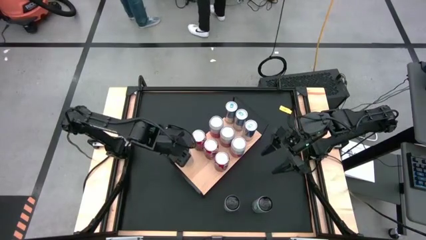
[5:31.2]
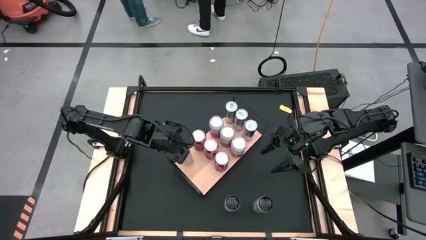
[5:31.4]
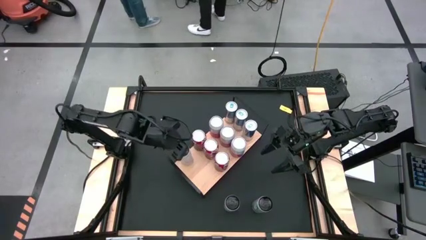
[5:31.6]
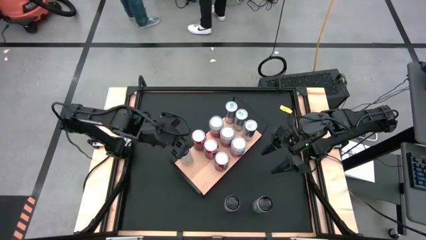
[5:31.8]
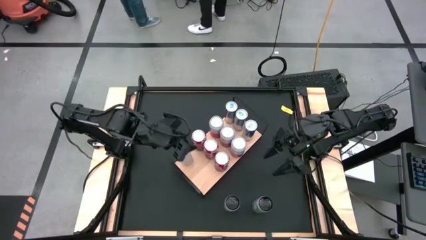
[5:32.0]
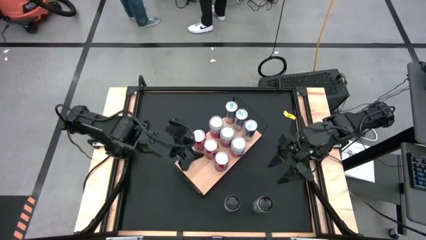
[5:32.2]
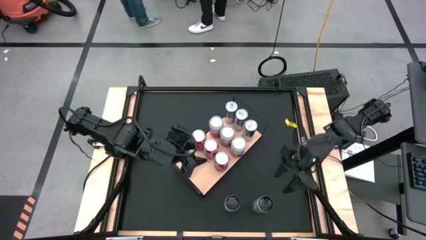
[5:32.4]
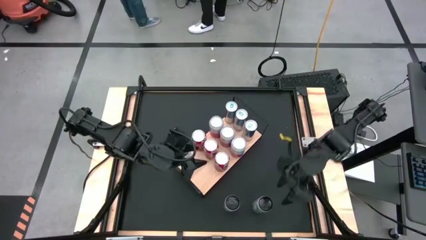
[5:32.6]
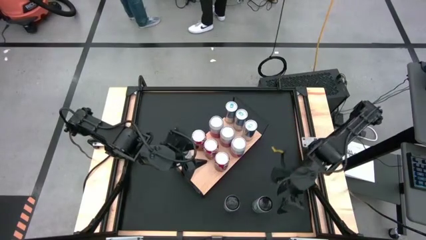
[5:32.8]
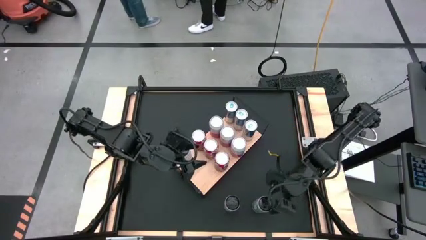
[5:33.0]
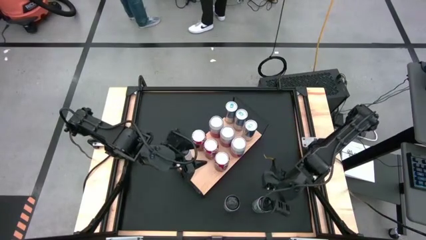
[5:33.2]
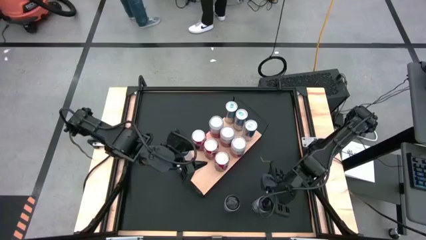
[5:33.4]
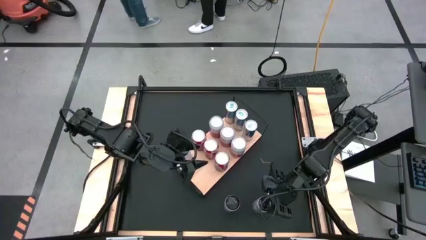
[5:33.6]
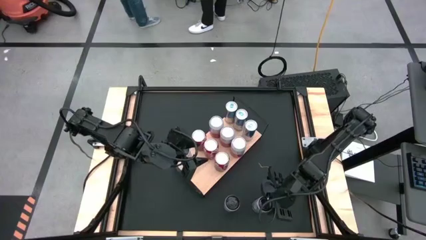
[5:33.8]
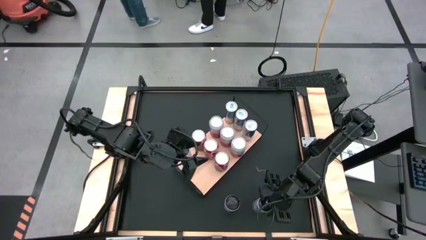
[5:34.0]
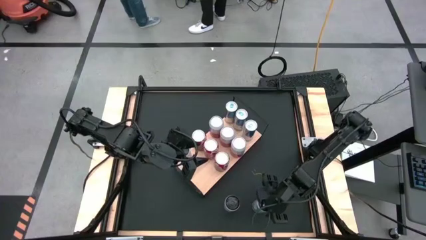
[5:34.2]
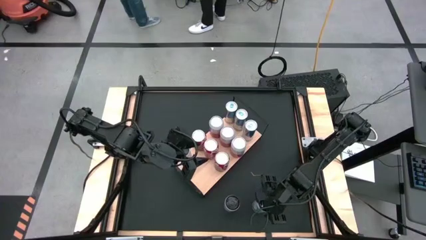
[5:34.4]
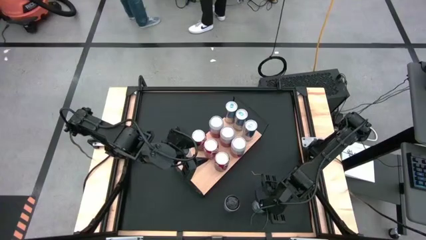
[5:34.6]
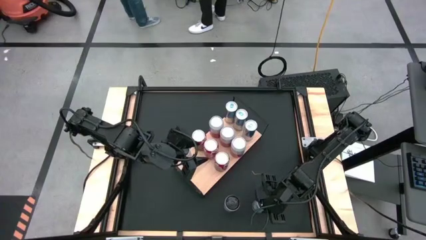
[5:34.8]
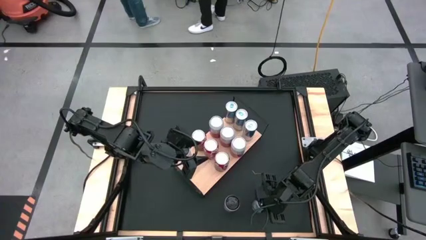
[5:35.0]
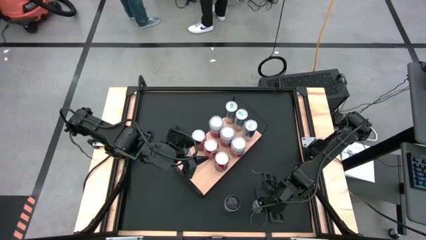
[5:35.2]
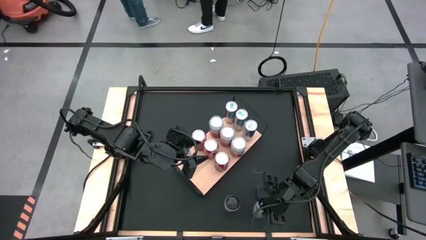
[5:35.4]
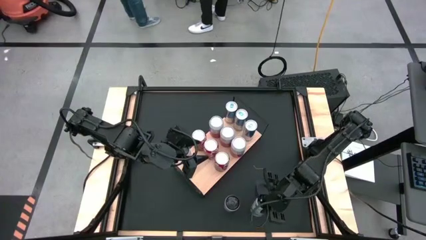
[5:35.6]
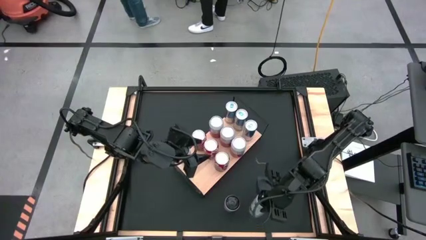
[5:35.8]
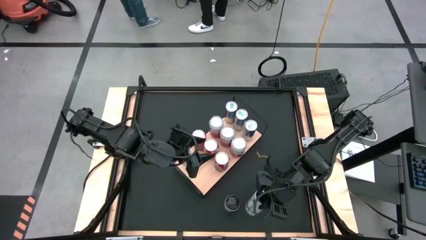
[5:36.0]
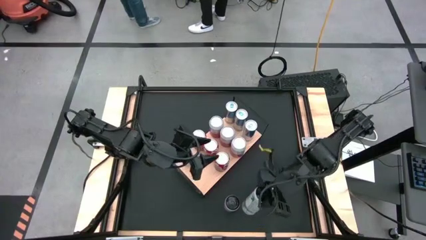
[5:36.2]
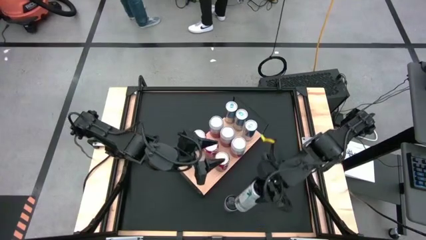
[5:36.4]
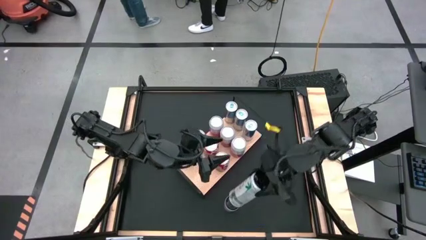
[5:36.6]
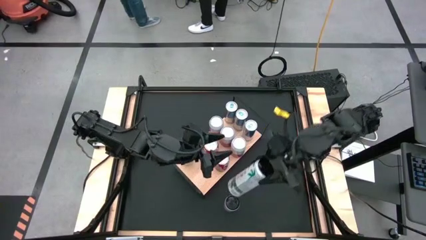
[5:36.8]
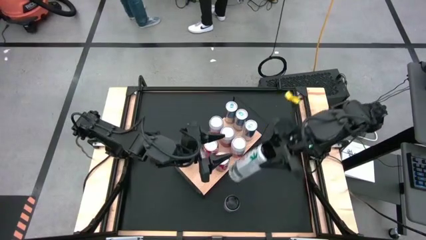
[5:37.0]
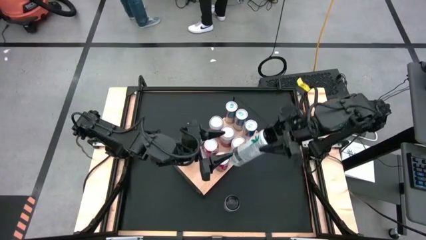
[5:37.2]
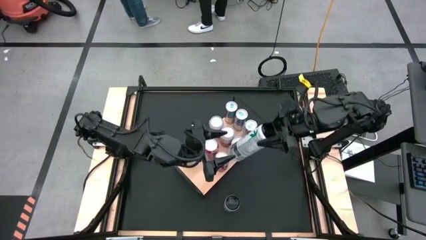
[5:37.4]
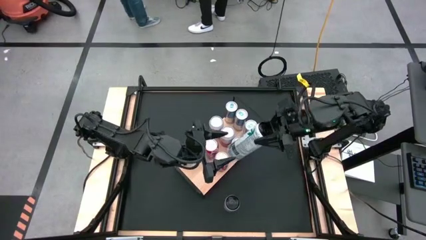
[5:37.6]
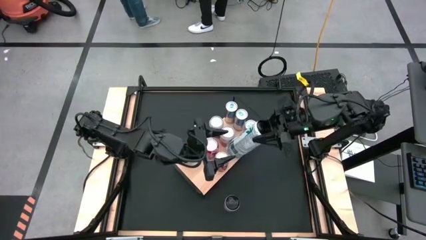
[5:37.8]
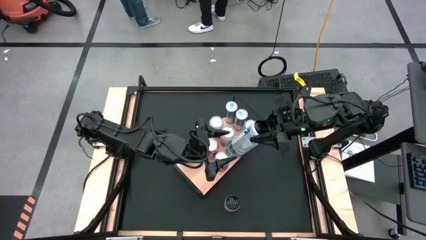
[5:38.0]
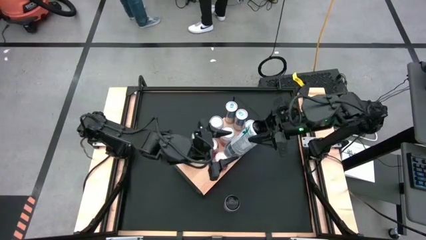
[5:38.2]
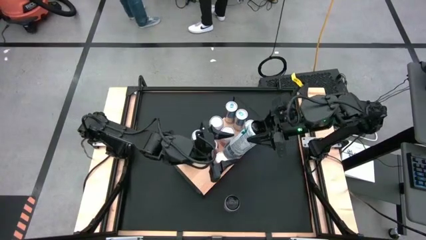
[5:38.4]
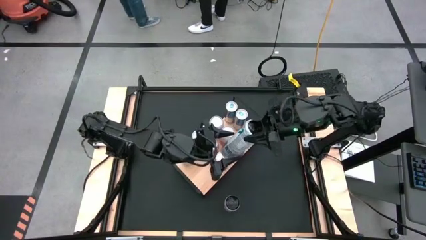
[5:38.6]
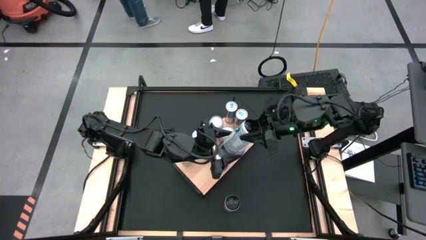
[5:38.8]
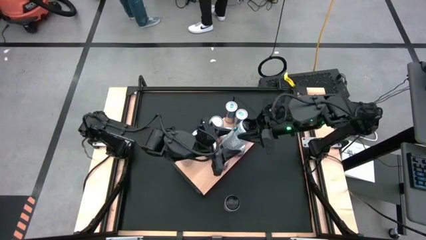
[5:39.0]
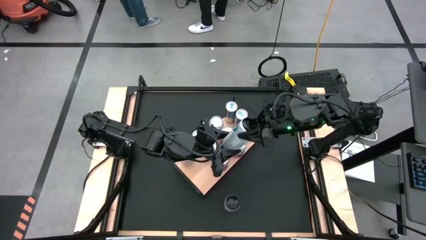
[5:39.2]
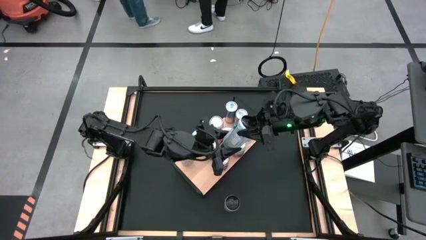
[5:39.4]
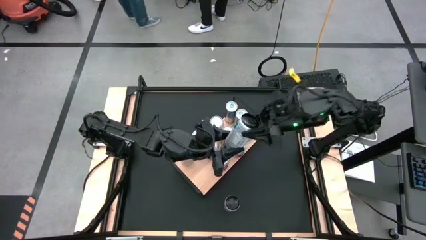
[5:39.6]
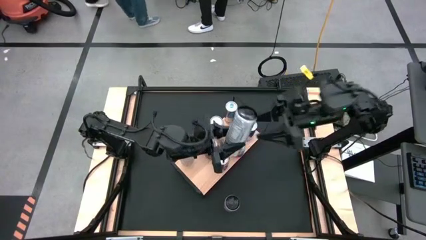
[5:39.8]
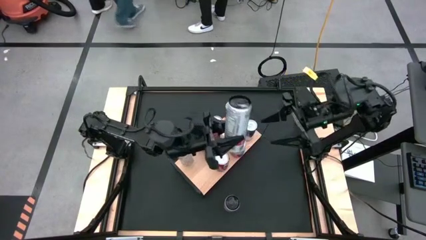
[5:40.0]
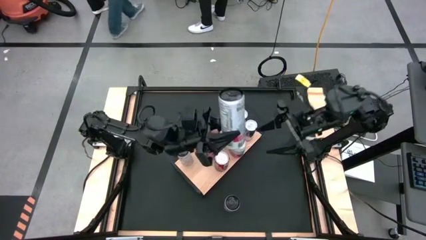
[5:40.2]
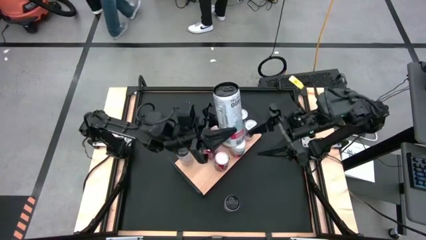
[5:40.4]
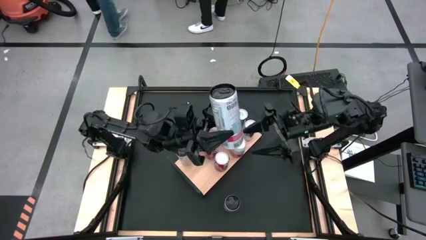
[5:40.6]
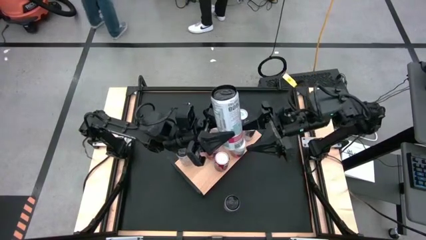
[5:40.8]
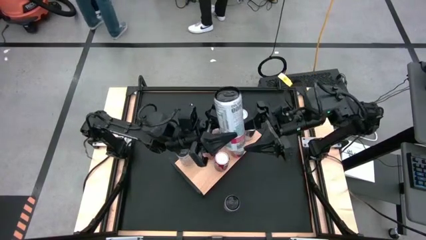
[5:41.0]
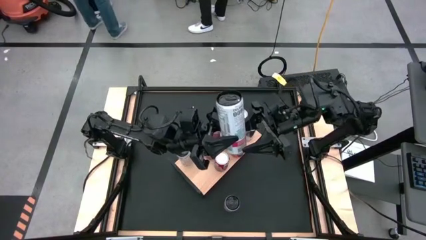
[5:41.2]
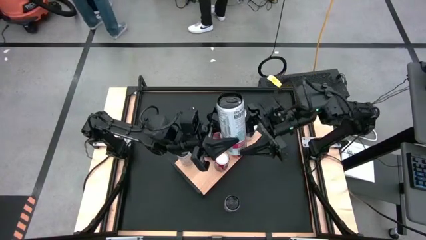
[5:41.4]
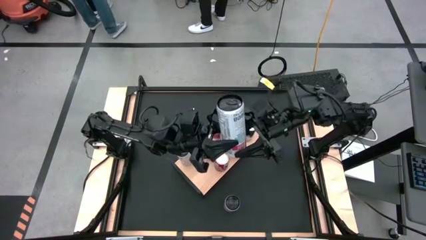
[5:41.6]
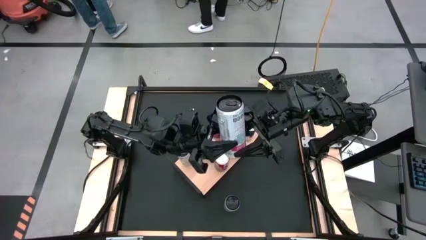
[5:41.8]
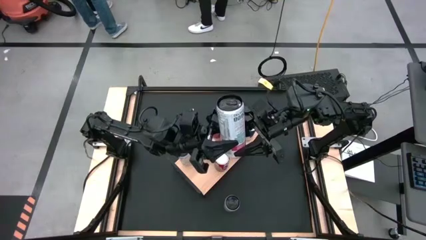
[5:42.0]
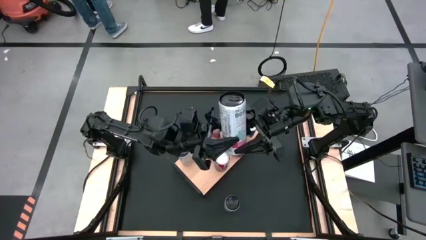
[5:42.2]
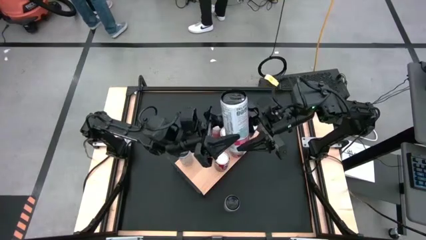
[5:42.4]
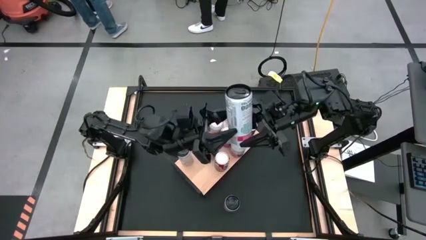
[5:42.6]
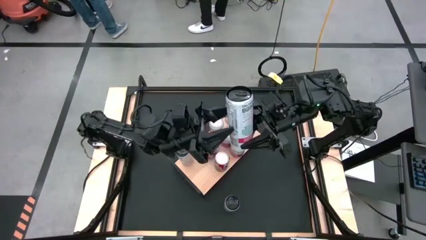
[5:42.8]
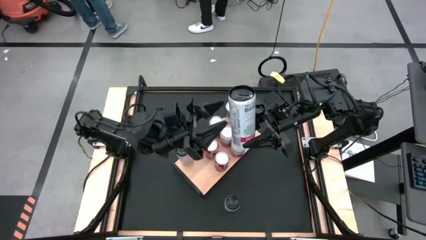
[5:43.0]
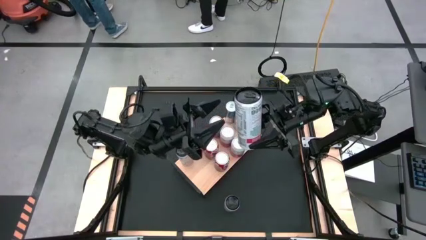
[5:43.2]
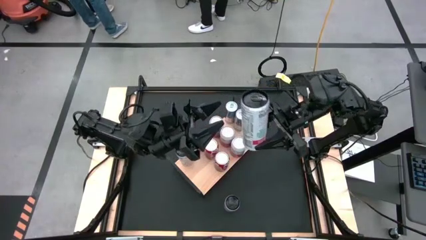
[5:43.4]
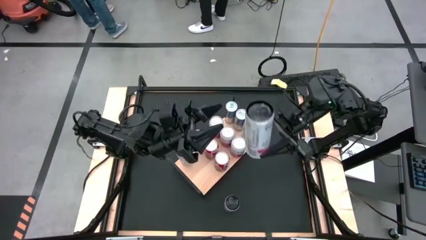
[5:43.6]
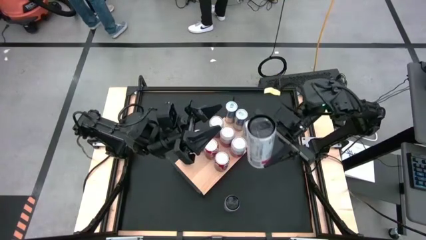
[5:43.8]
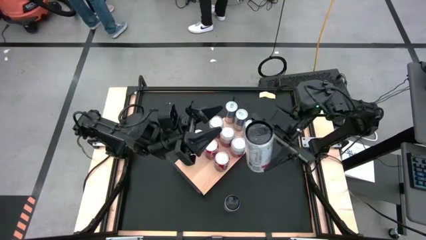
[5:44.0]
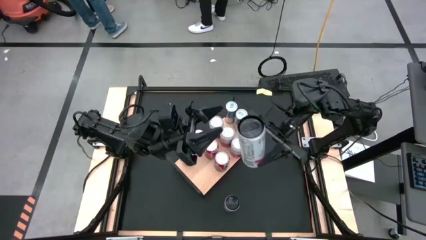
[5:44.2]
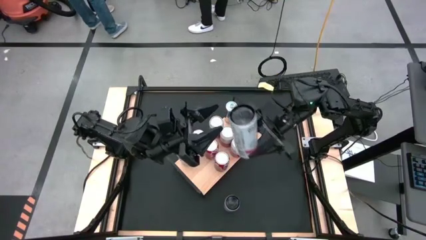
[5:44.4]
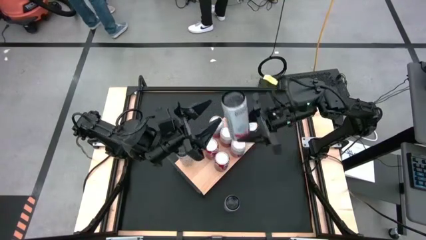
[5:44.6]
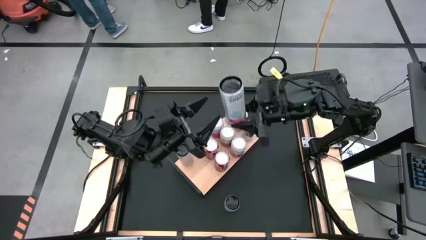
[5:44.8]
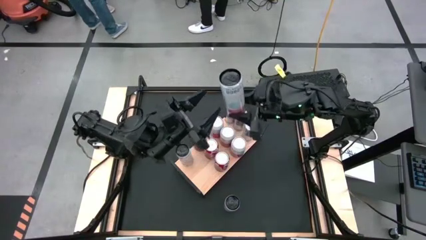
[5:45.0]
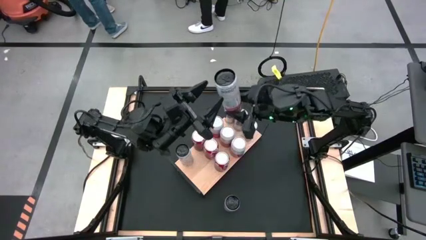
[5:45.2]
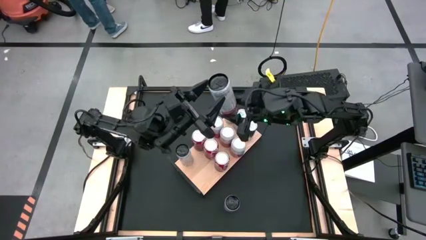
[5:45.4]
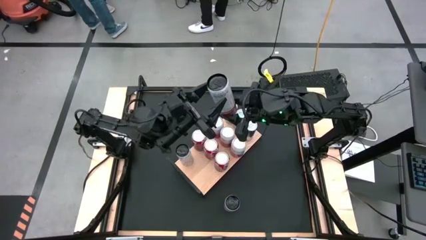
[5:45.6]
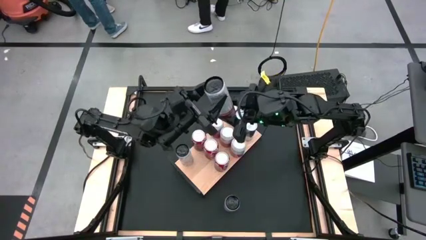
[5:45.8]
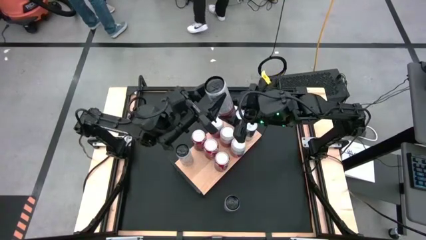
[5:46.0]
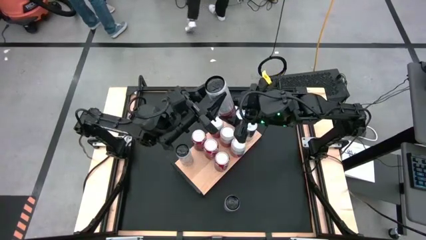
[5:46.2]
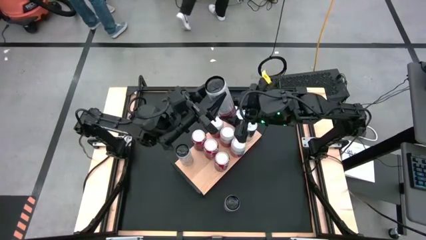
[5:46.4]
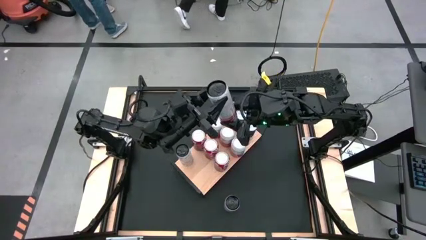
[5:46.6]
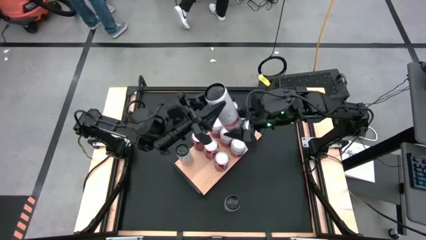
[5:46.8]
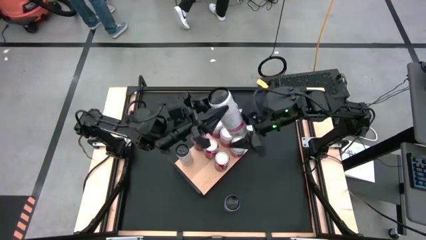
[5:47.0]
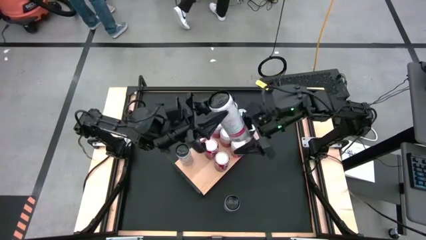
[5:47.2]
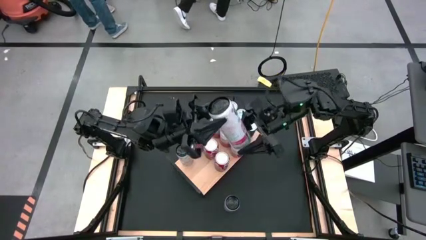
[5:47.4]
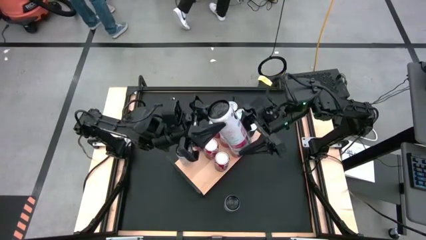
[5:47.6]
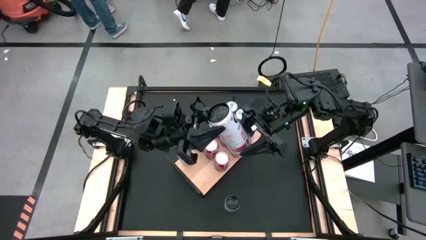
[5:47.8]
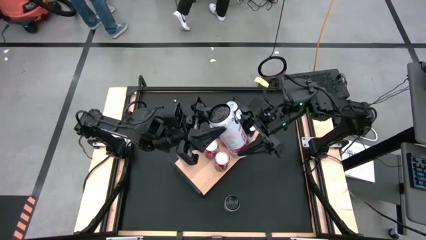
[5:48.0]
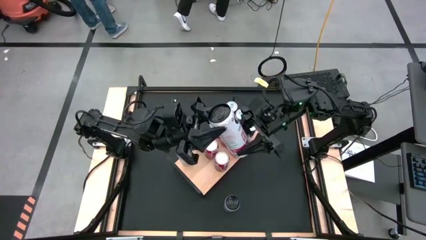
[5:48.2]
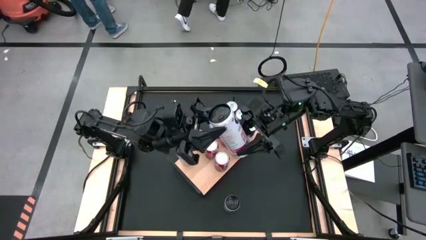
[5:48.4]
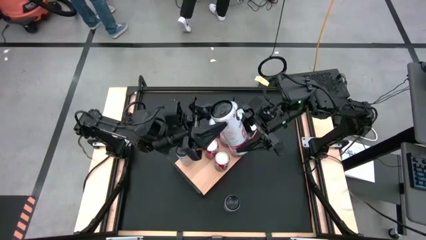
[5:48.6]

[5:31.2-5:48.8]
Task: Place canned beverage on shelf
Put the right white pink soda can on the shelf aligned with the other white pink soda can
